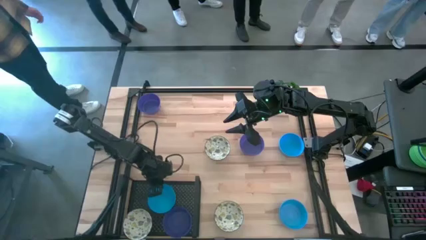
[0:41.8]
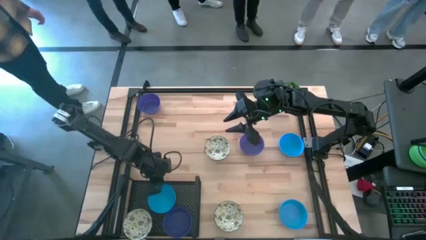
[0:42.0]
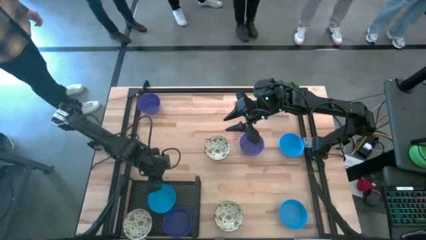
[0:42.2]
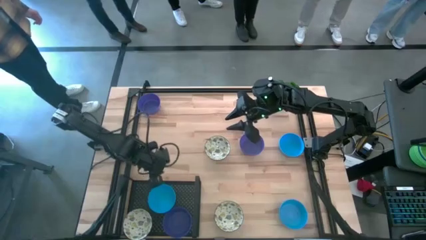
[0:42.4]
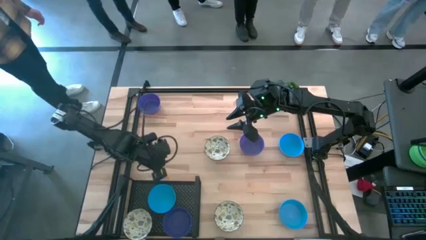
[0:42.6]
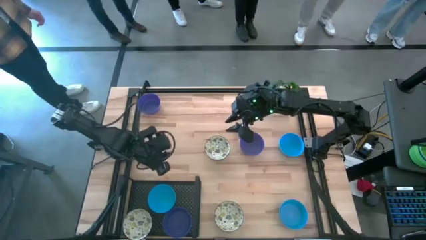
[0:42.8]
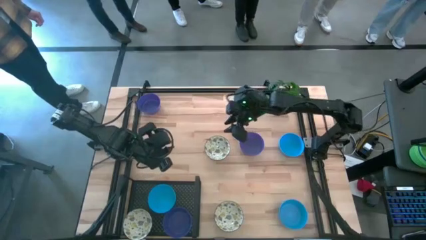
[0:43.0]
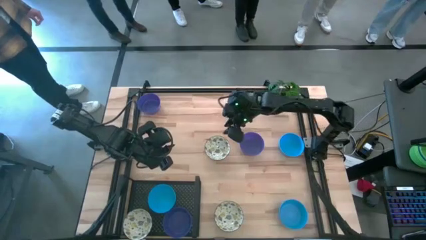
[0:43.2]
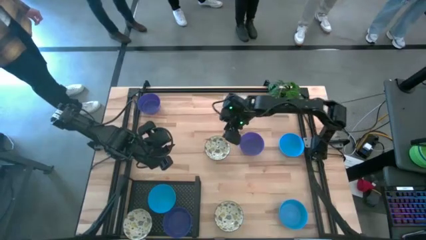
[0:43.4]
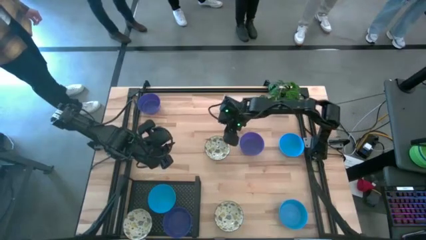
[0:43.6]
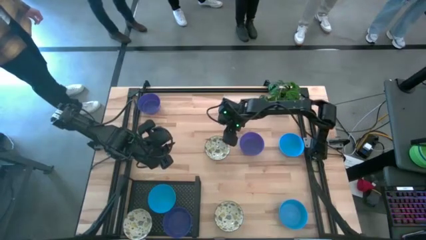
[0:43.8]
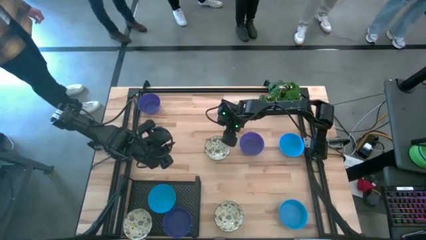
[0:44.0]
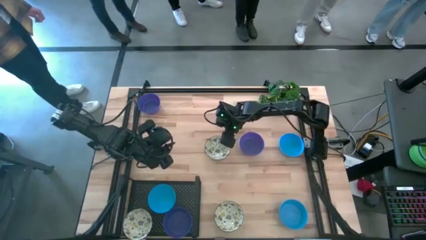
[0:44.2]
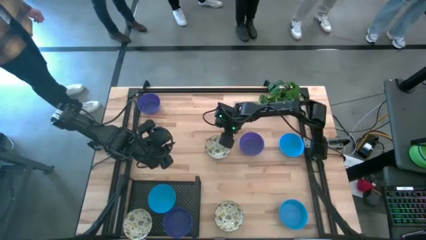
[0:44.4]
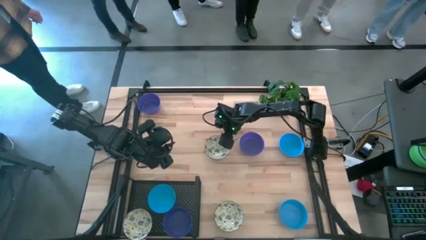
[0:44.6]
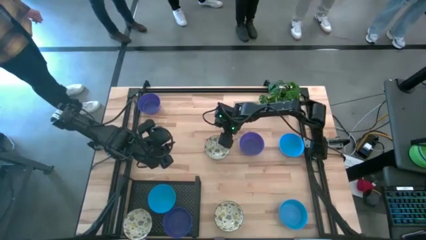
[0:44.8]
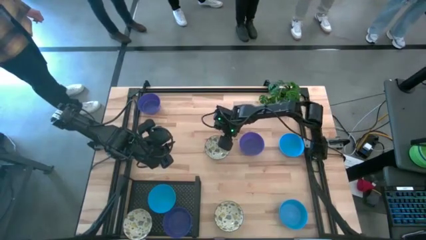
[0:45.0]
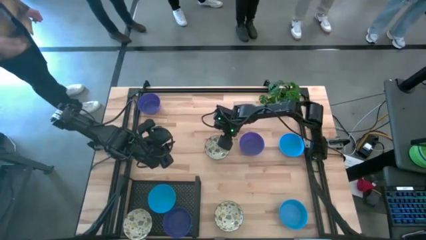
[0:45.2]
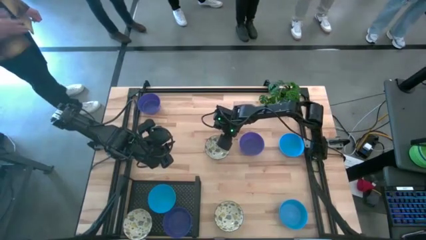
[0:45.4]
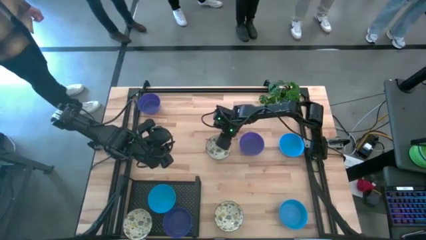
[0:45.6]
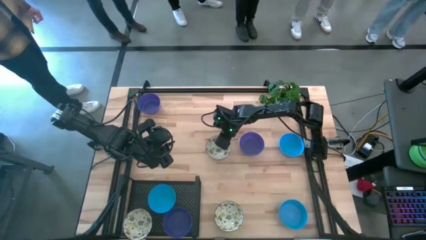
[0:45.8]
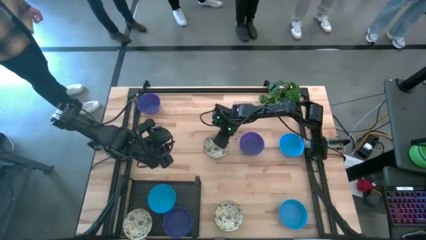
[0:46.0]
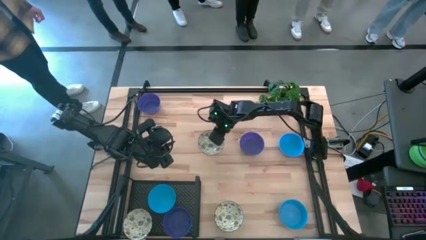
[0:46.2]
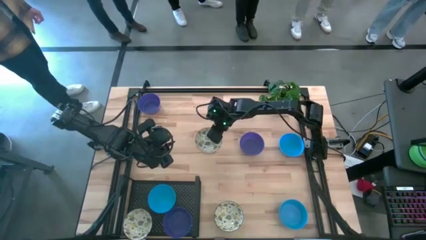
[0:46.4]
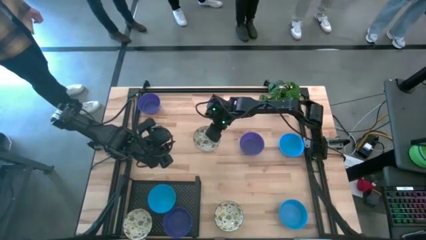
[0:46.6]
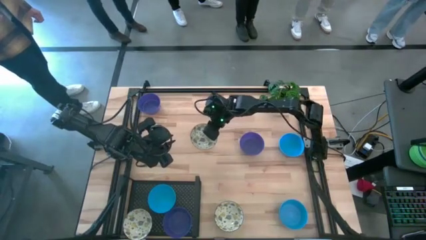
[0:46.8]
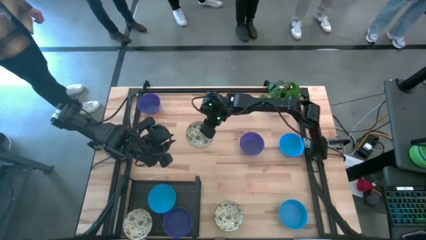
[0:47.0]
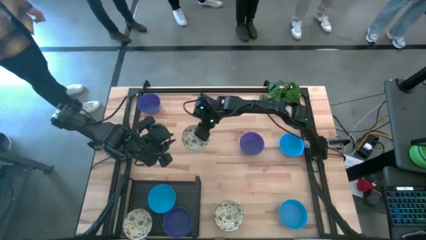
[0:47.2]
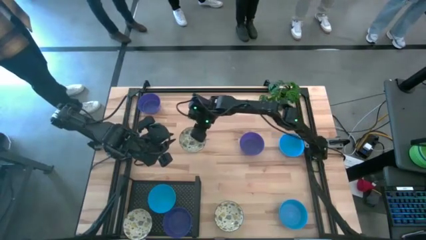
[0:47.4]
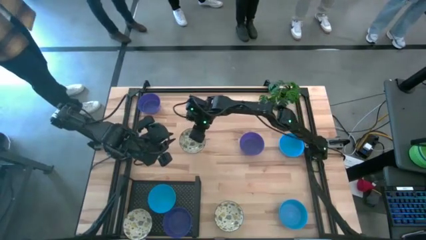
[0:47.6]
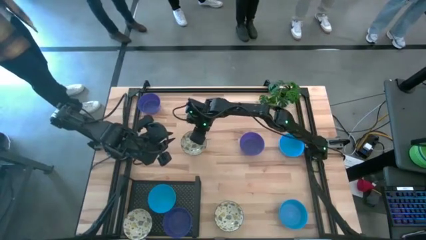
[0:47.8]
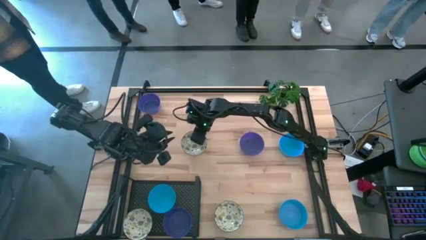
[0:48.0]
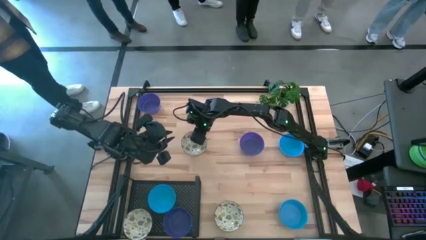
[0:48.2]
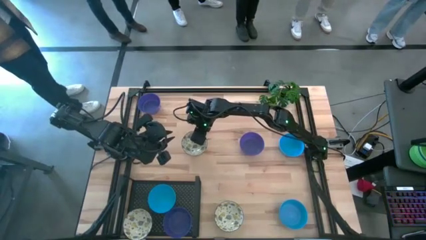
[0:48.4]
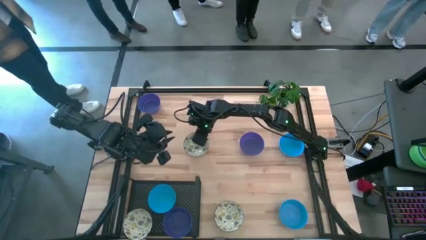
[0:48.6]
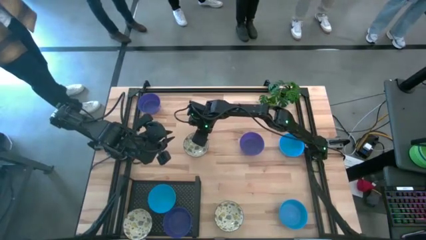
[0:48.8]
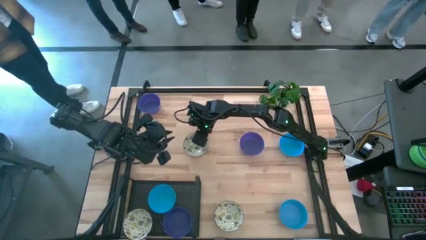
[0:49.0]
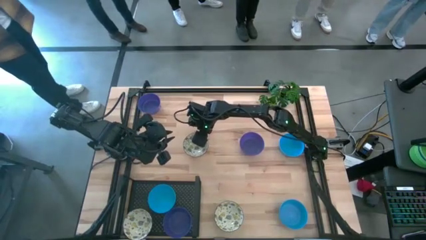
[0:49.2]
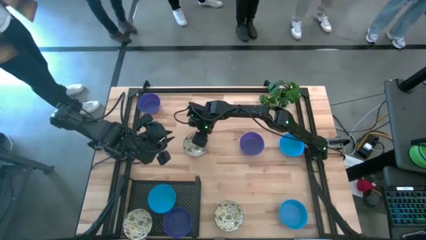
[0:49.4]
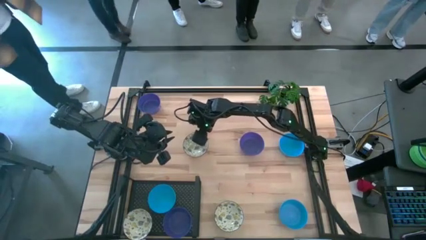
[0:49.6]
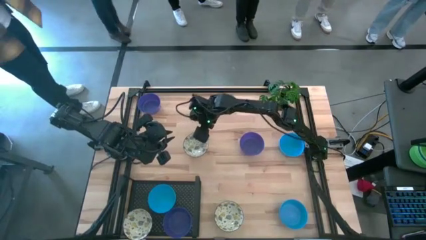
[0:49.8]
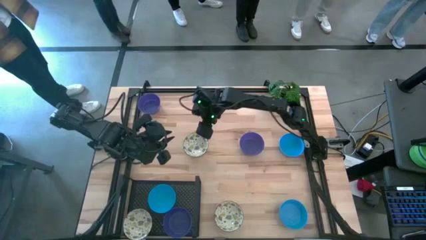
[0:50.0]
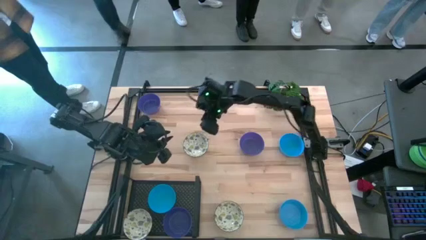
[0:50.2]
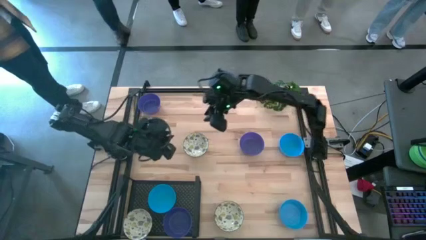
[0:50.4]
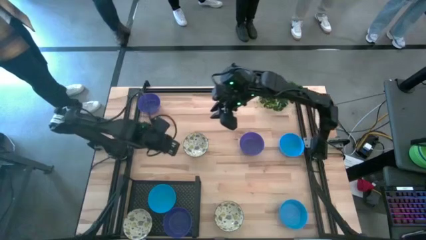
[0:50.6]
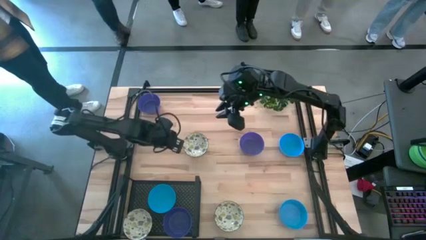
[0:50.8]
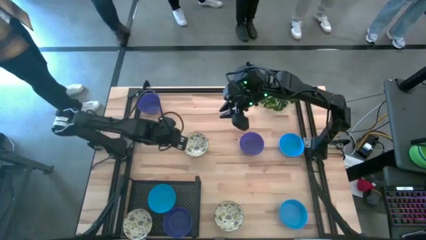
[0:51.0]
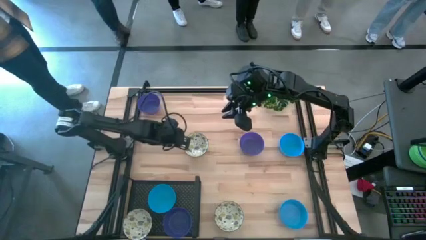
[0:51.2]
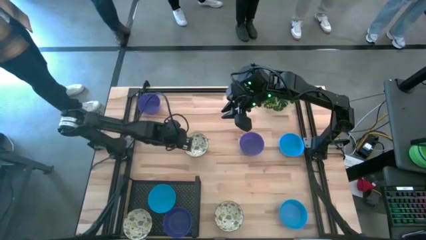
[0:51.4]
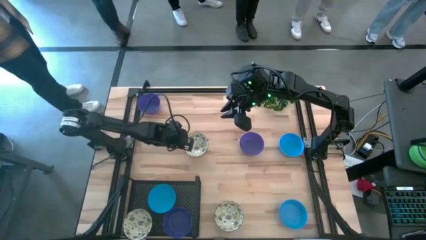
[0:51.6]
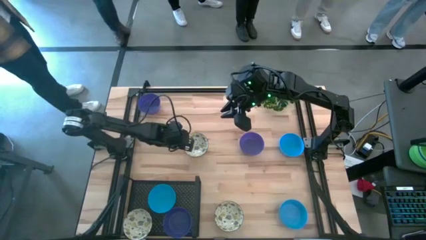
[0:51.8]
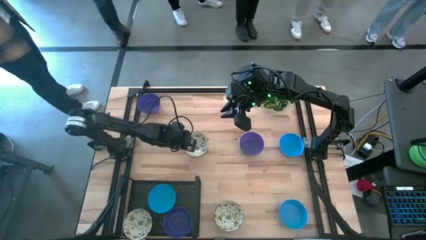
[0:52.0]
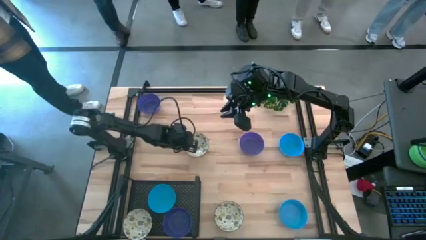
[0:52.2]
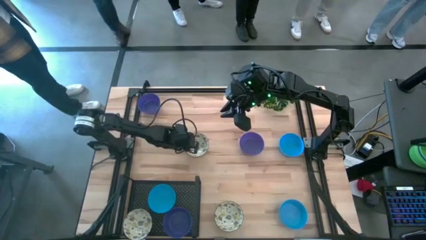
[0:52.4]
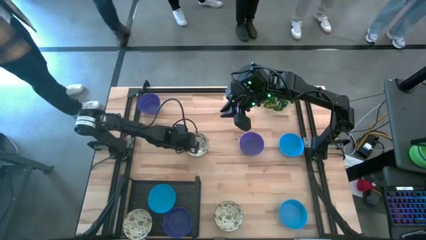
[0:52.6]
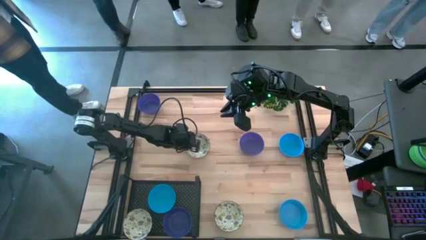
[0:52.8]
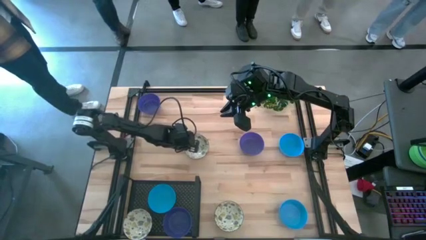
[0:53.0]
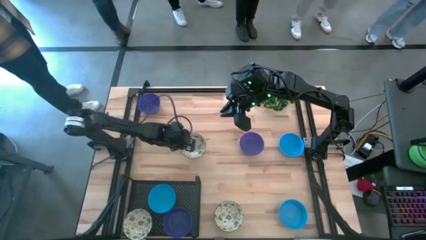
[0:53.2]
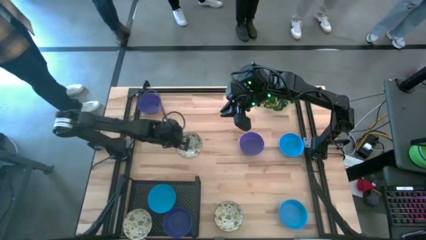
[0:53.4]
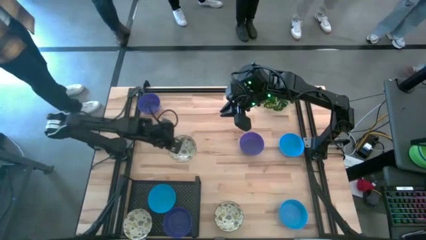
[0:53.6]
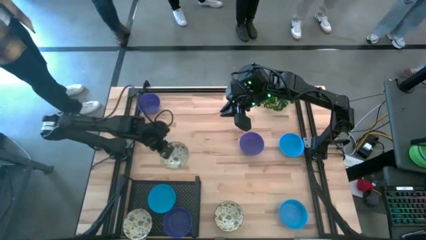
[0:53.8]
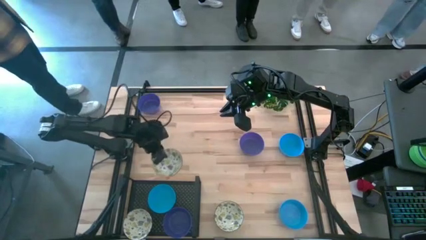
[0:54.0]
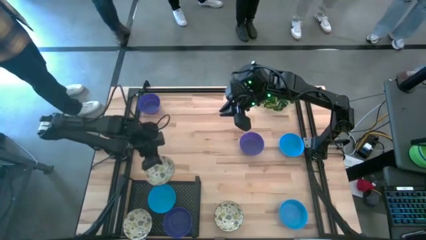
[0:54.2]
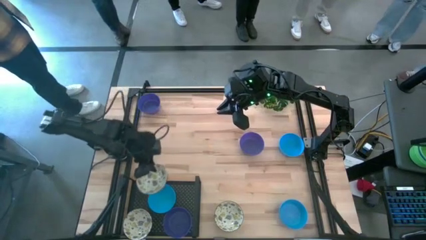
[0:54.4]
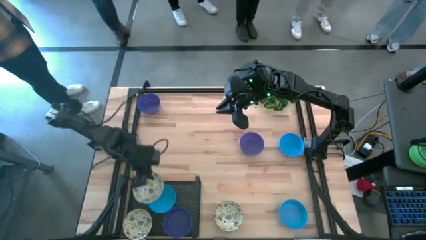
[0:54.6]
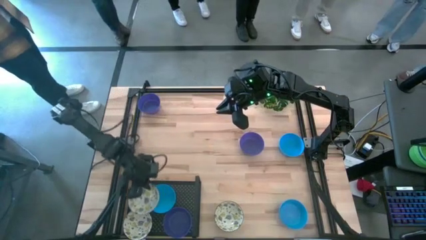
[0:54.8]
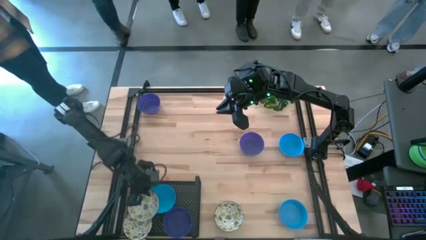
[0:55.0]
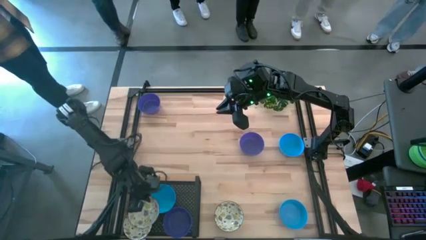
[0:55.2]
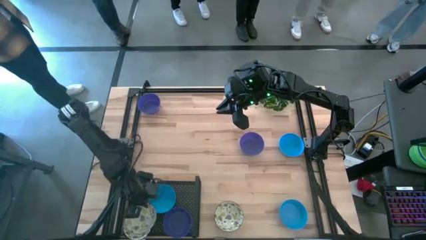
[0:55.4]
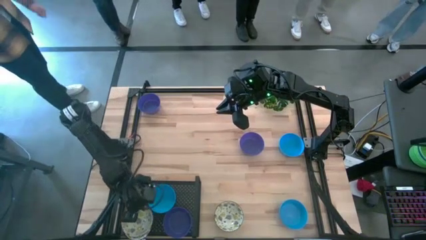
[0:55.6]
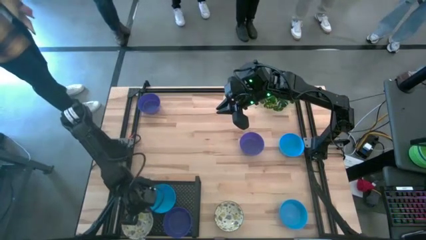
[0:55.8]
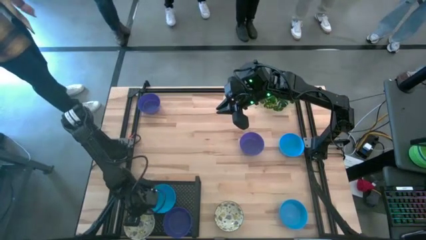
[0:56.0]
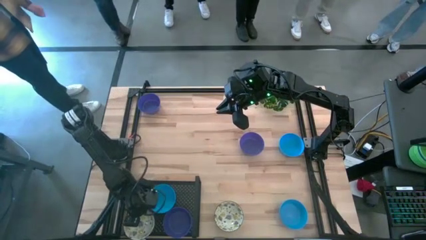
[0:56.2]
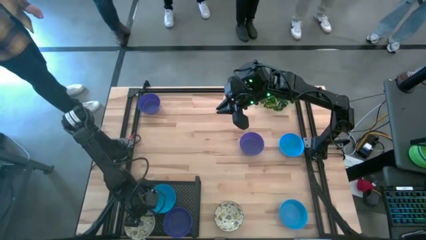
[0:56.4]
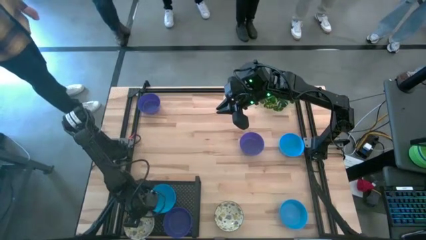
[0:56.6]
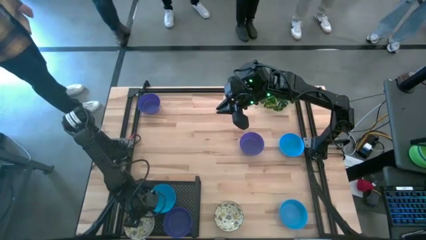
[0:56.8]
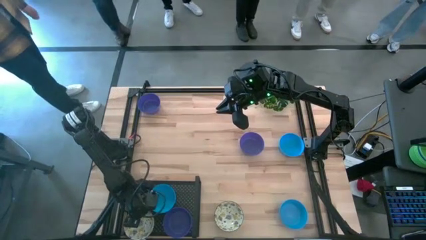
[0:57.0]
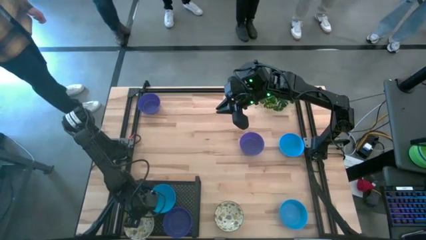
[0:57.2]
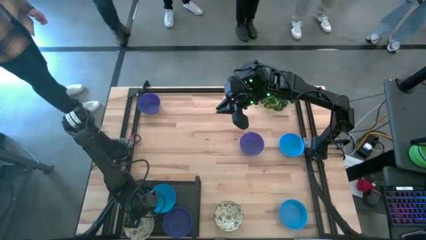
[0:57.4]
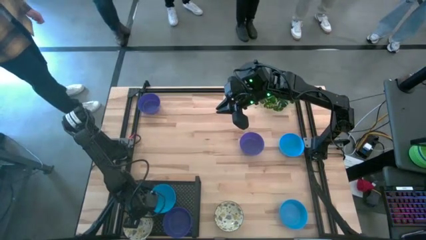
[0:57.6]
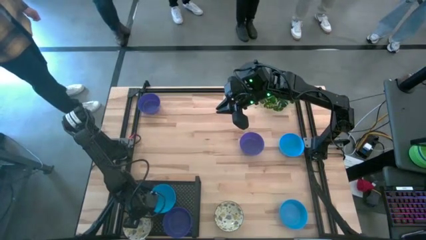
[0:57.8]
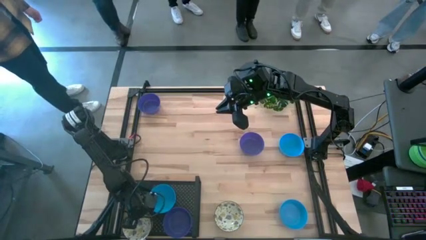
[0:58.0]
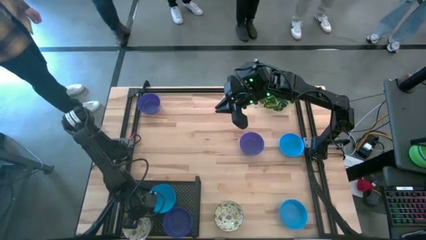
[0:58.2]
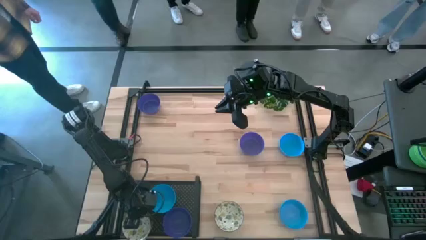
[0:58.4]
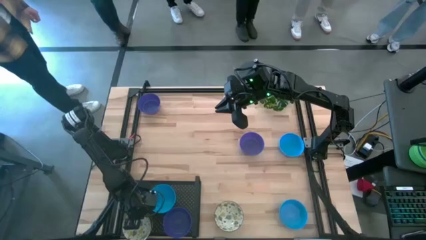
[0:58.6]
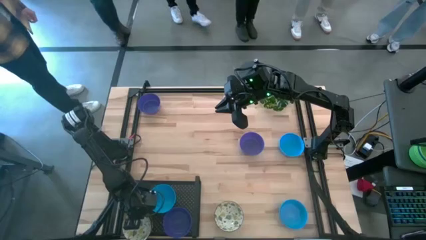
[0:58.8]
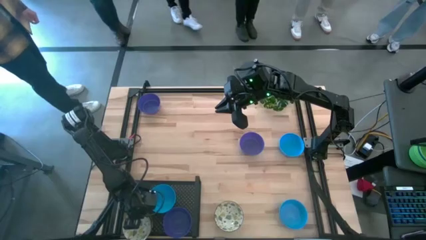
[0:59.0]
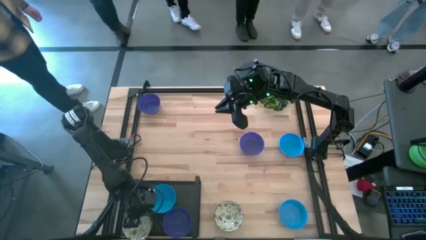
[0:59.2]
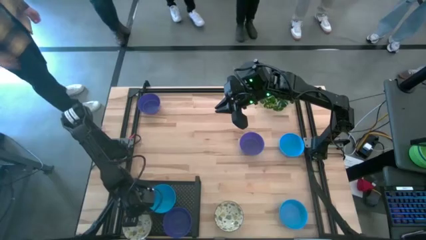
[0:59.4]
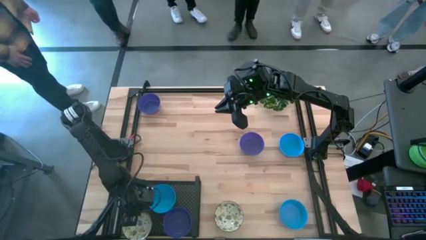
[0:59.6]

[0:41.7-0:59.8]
Task: Pick & Place Mini bowls
Stack the top yellow patterned bowl on the yellow patterned bowl on the shelf
